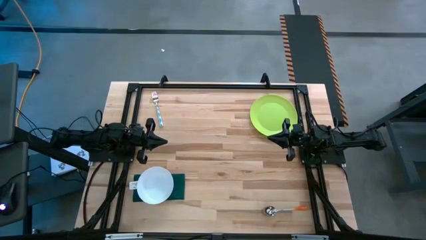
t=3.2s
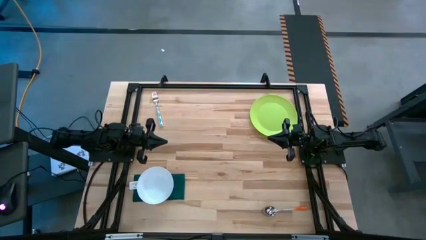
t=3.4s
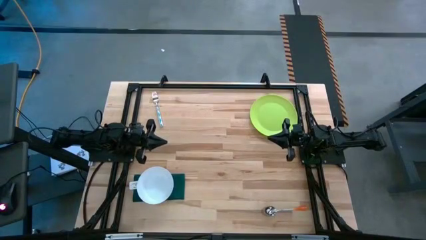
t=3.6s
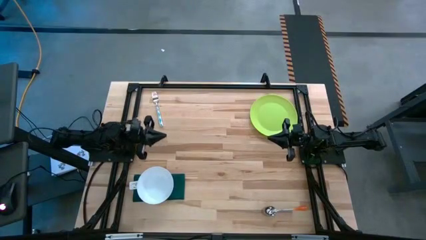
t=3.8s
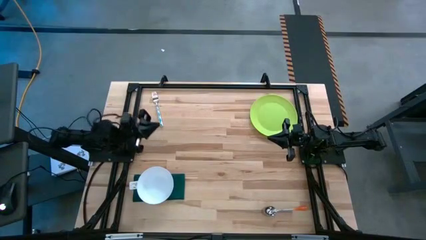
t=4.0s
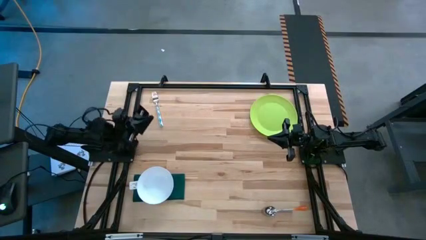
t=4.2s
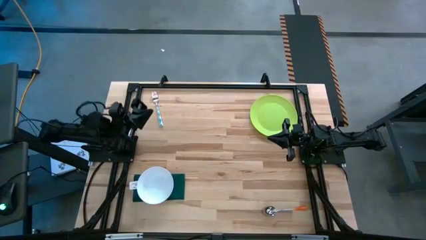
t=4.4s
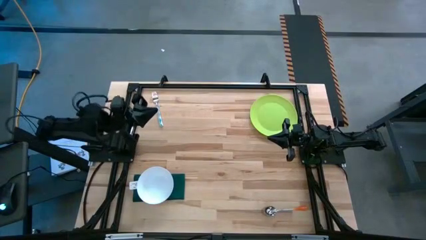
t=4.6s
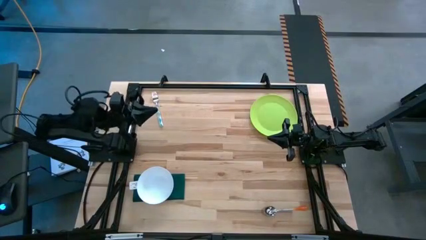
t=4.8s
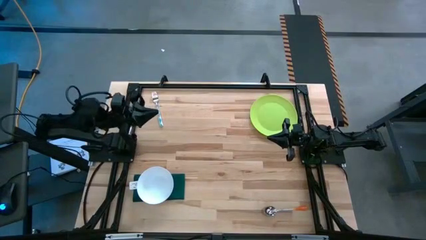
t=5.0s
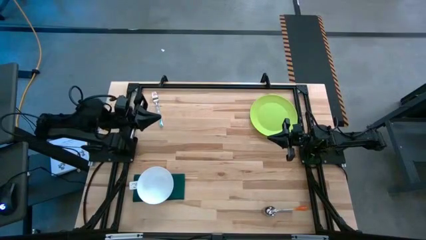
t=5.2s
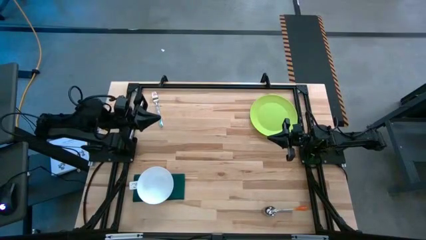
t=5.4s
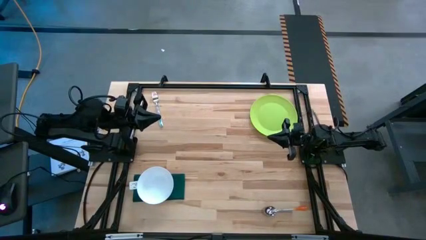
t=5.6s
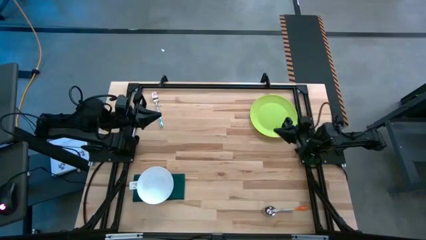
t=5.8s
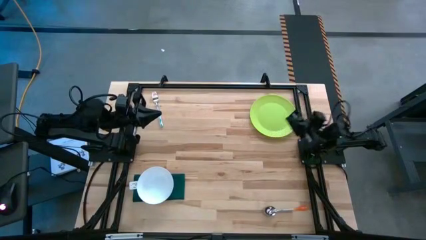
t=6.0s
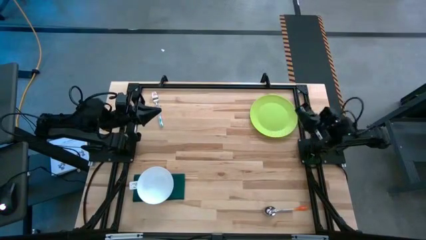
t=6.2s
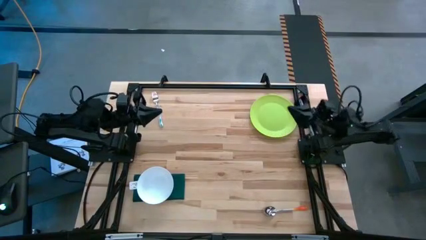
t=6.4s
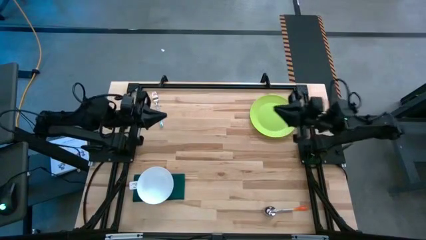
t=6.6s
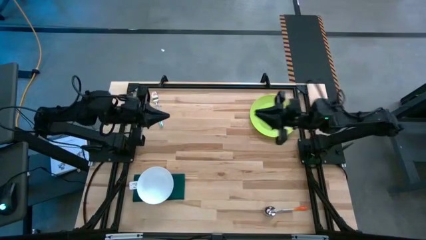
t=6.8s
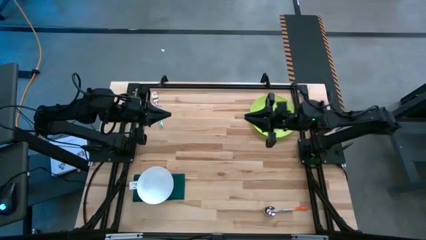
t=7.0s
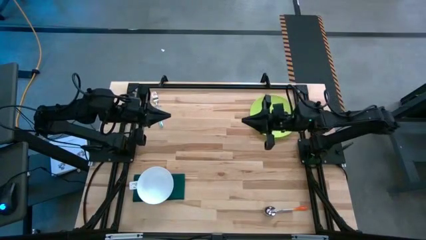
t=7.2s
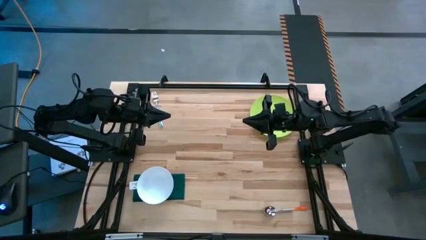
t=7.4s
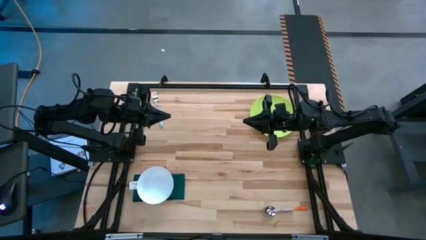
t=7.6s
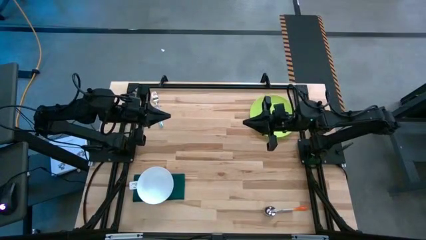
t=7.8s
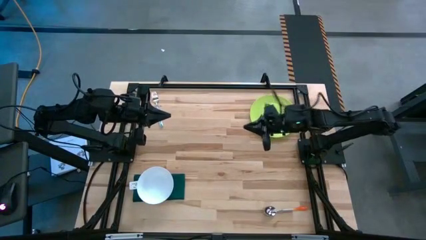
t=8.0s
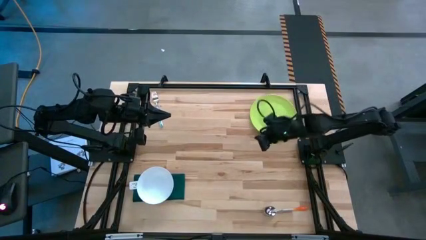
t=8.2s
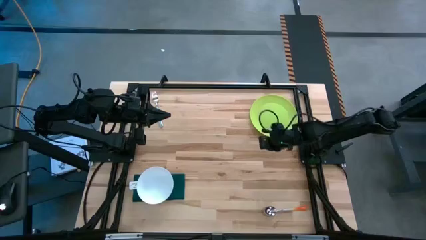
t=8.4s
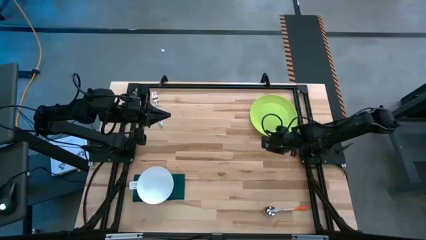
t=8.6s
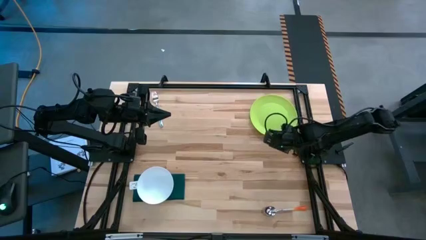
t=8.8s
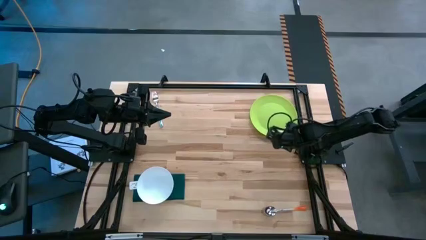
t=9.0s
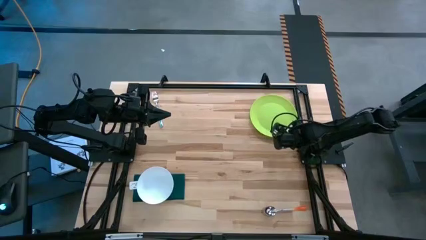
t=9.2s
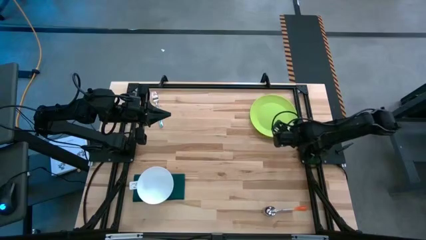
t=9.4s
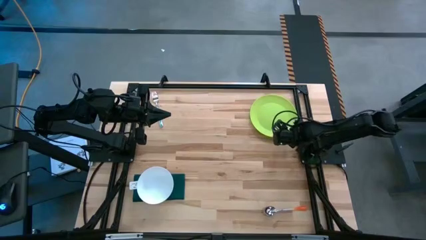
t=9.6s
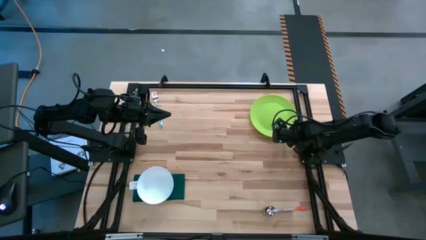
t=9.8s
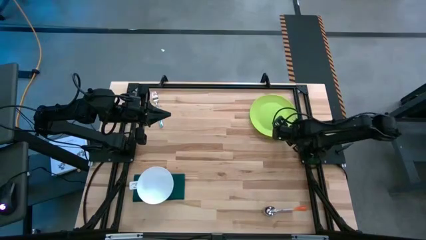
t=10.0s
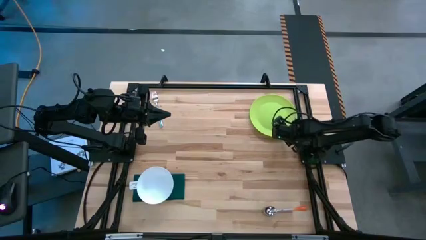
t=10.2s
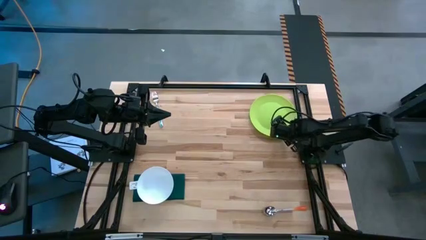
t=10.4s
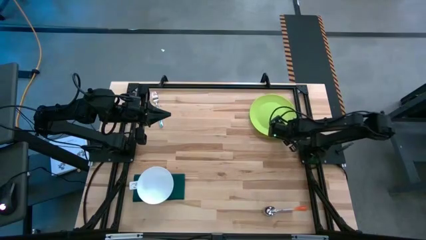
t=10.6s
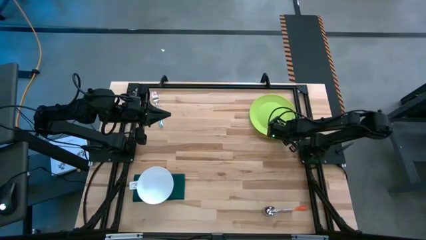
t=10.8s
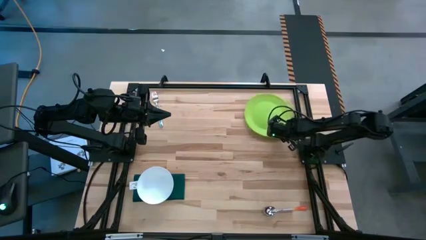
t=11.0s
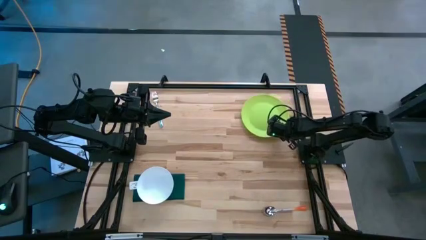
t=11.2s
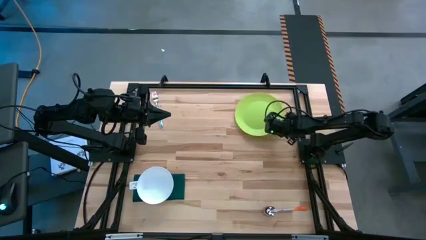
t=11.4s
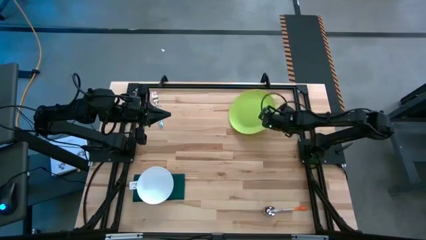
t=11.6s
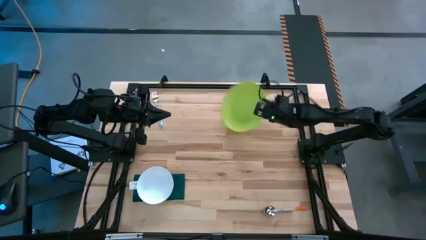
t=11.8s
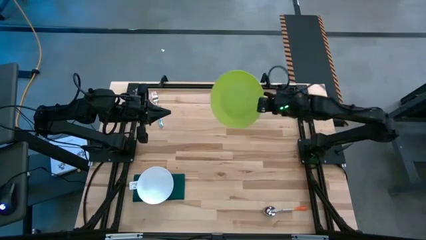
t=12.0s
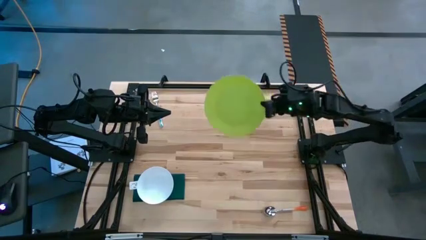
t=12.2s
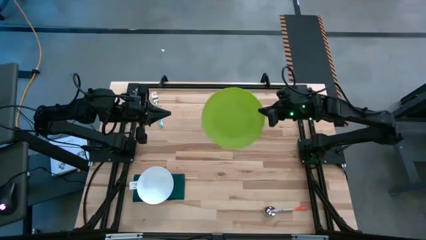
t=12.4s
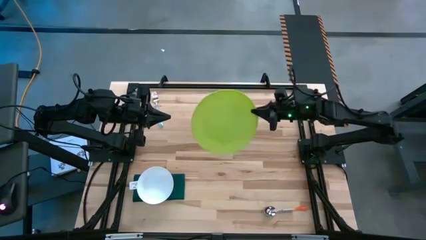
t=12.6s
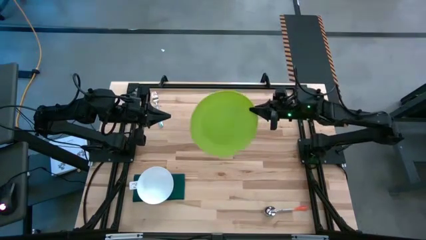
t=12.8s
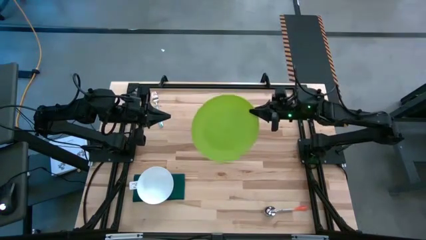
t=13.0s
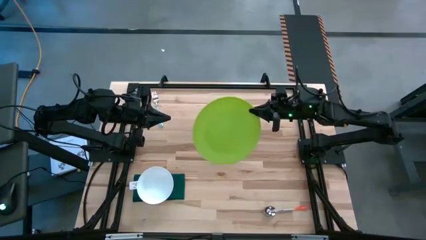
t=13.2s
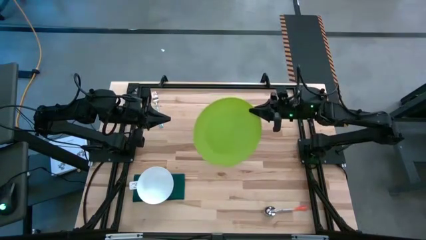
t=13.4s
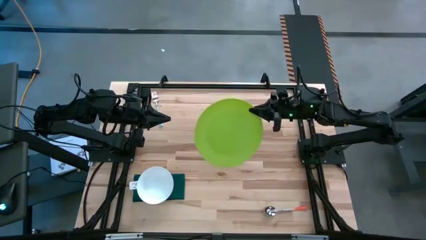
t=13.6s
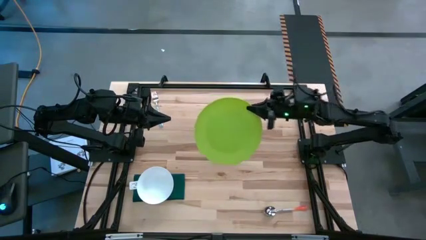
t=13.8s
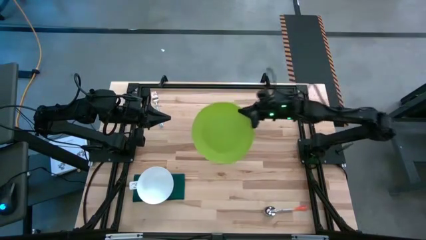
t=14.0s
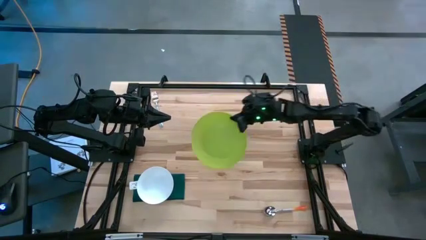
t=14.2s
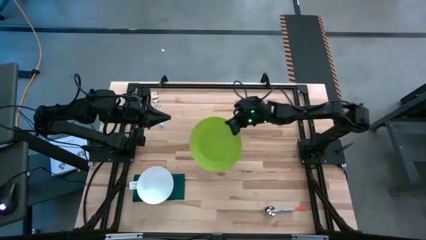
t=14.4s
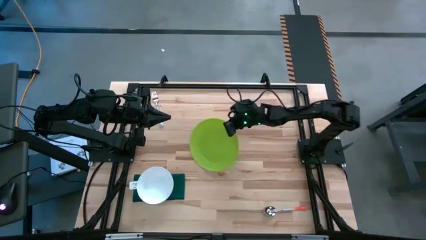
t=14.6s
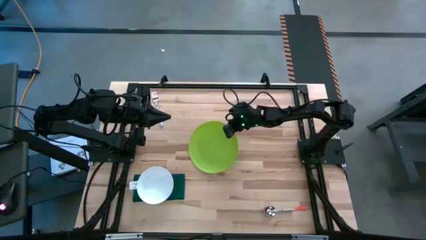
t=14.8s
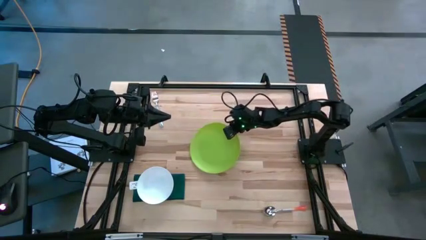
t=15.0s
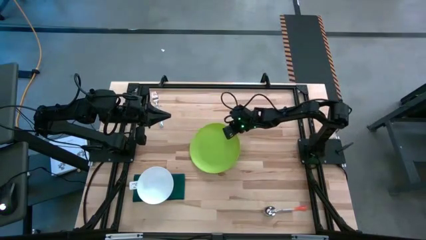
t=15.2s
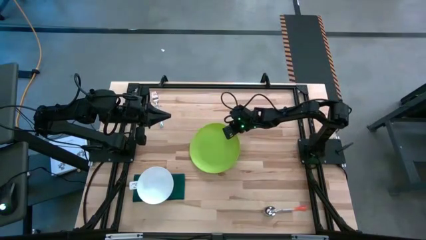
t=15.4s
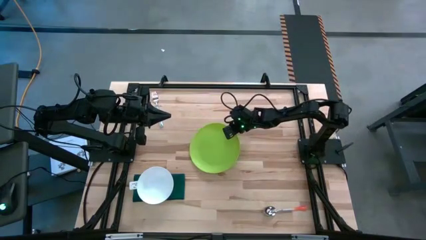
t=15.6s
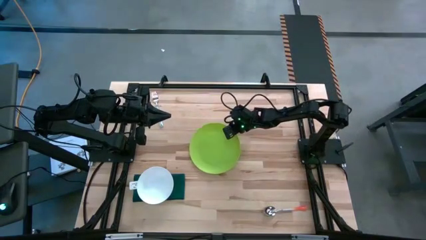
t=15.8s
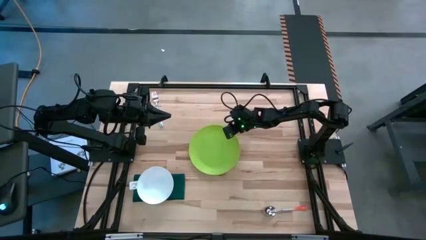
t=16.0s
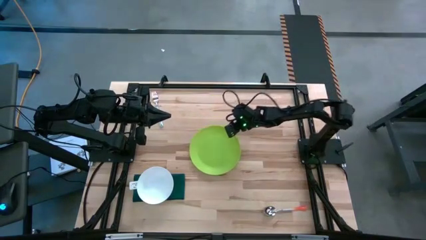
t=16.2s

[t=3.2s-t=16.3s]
Task: Set table place
Move the green plate to the center of the table

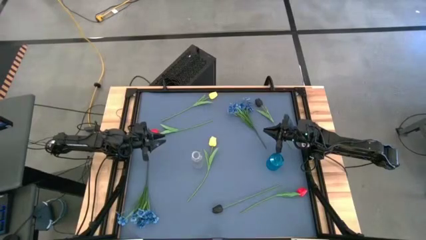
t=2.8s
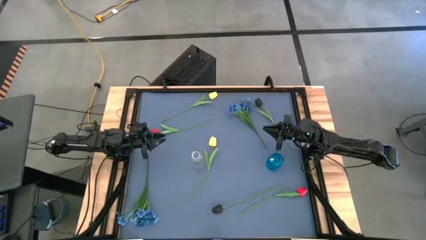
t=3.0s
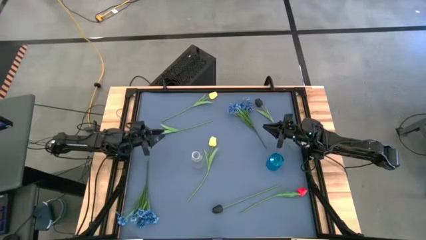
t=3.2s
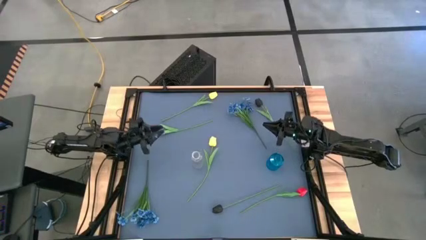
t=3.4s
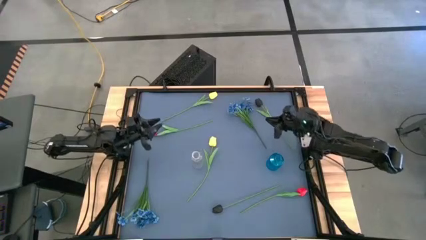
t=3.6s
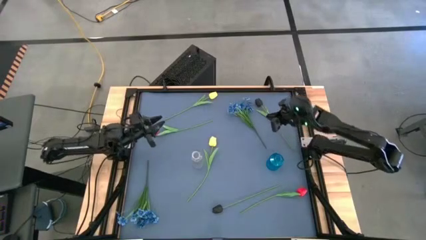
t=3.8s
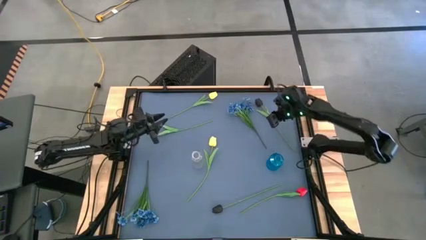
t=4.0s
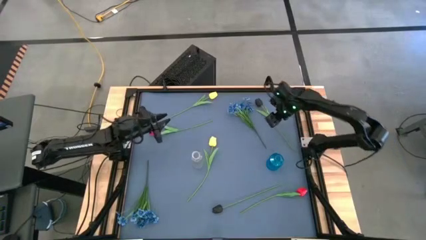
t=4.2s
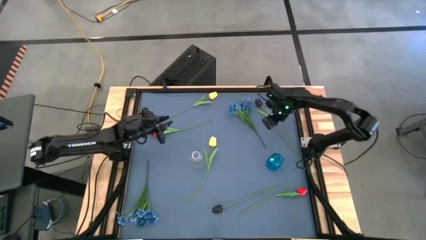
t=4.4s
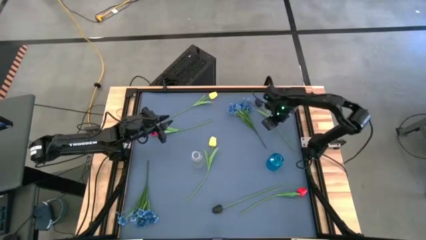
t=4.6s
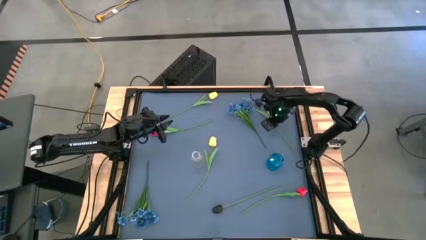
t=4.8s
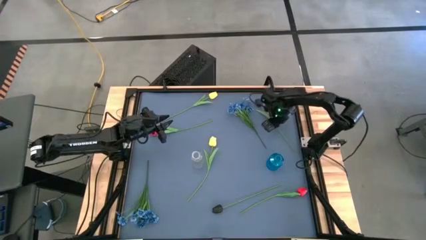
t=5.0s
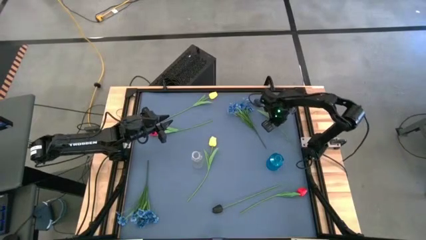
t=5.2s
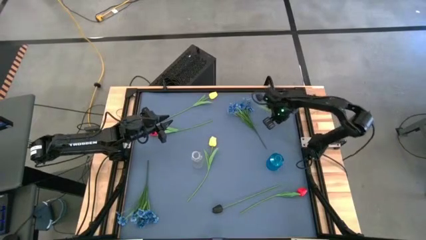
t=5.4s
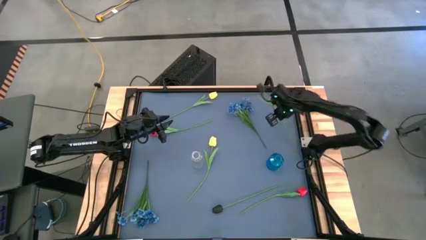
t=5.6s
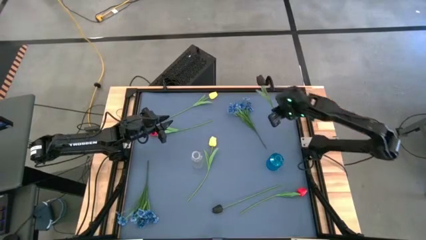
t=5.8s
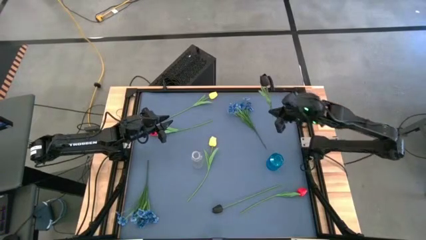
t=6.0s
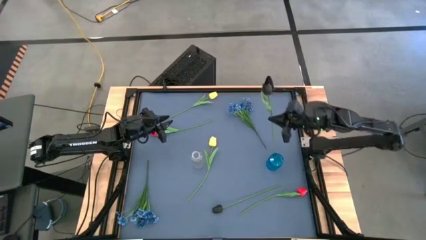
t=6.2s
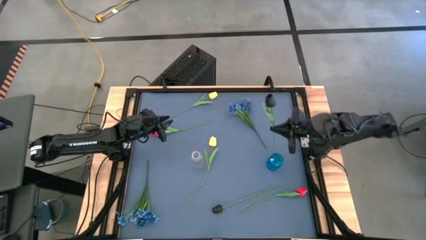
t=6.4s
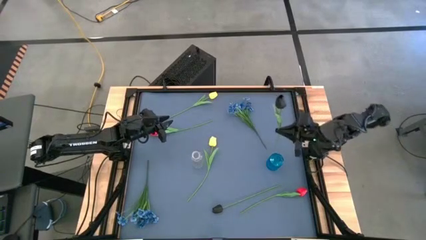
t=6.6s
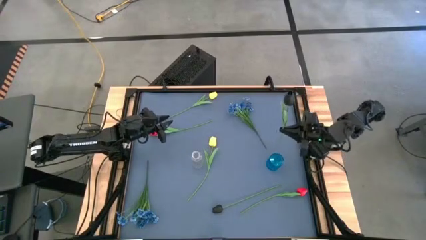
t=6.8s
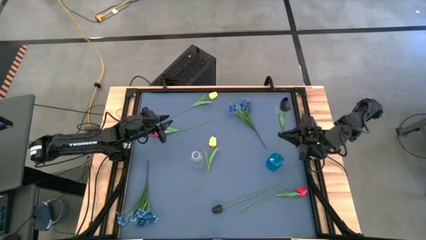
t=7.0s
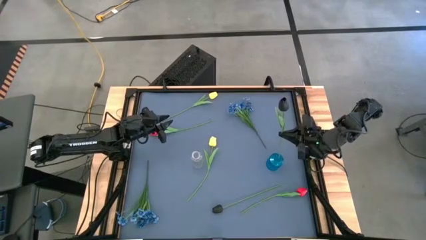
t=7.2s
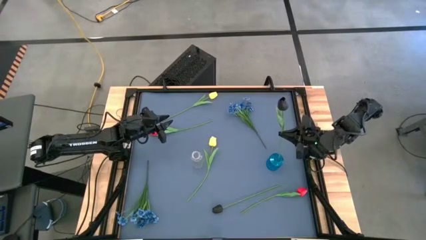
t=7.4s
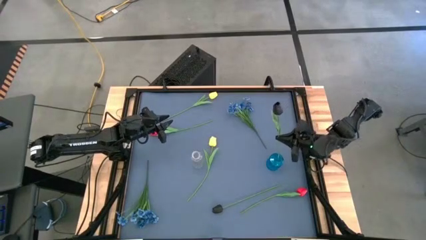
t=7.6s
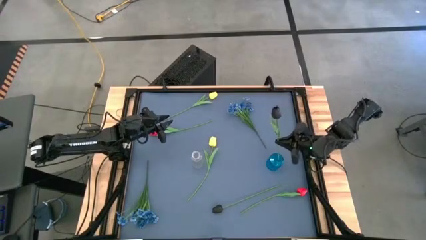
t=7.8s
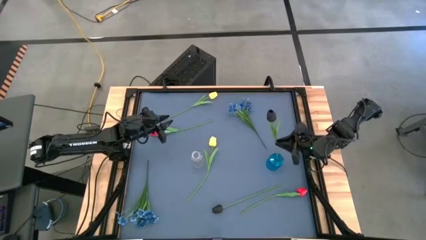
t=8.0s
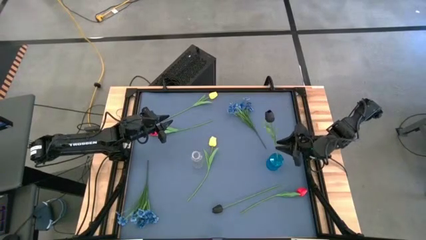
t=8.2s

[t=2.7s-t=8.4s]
Task: Sort flowers into vase by color
Put the top black flower into the blue vase
